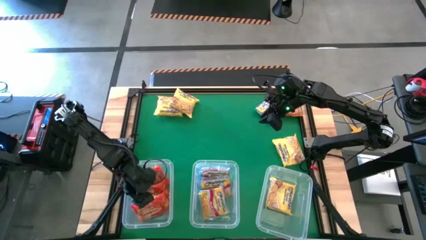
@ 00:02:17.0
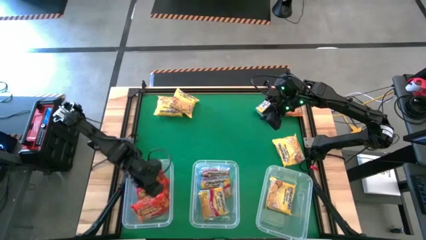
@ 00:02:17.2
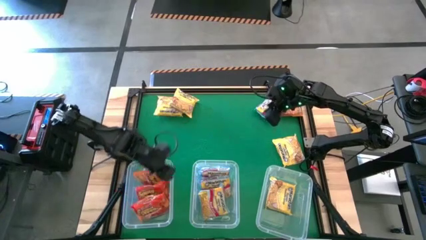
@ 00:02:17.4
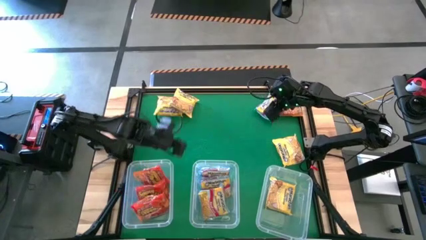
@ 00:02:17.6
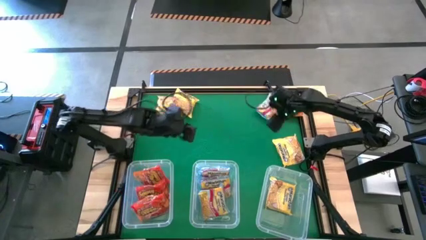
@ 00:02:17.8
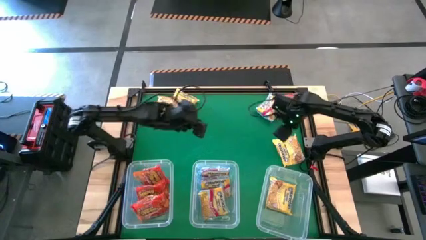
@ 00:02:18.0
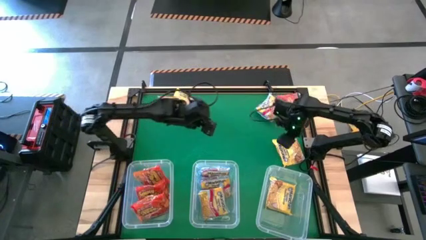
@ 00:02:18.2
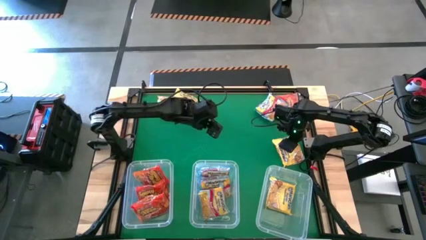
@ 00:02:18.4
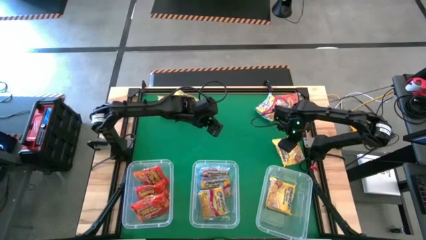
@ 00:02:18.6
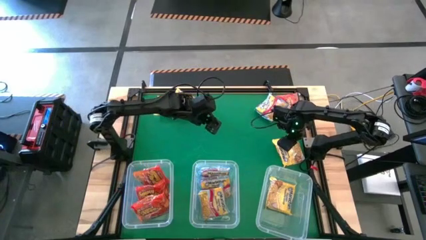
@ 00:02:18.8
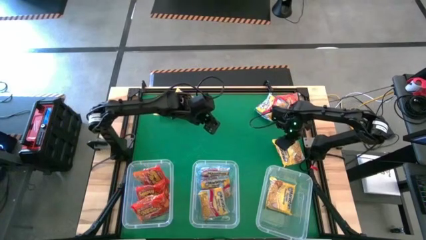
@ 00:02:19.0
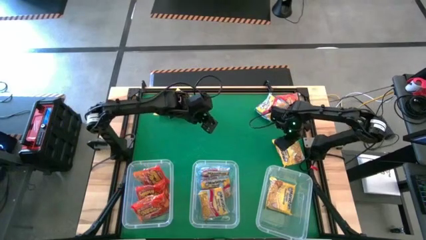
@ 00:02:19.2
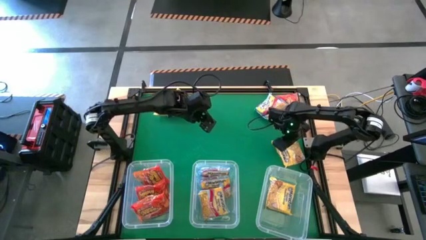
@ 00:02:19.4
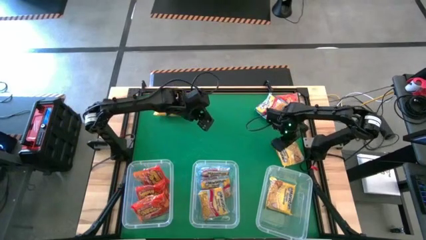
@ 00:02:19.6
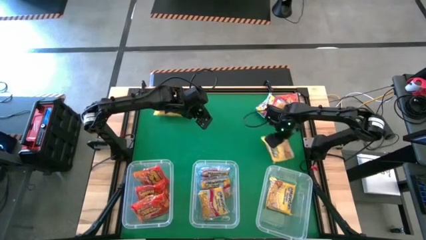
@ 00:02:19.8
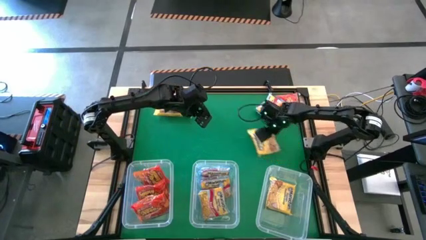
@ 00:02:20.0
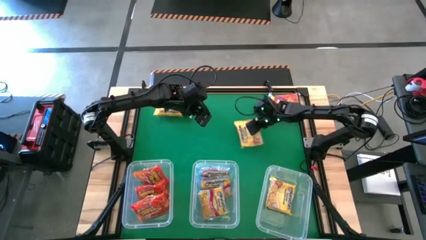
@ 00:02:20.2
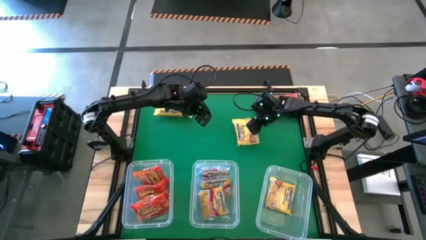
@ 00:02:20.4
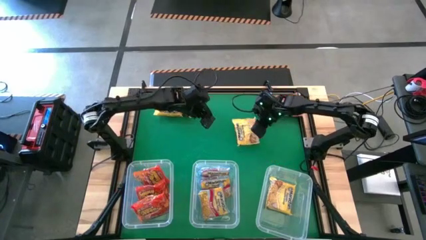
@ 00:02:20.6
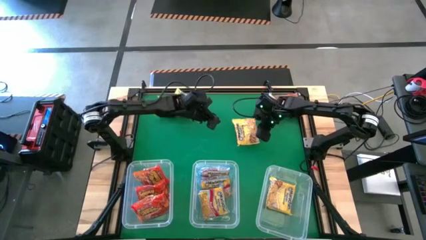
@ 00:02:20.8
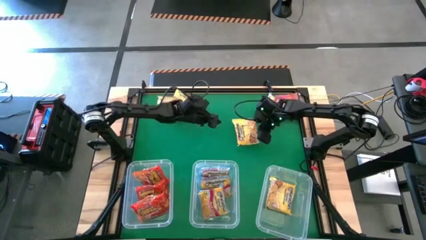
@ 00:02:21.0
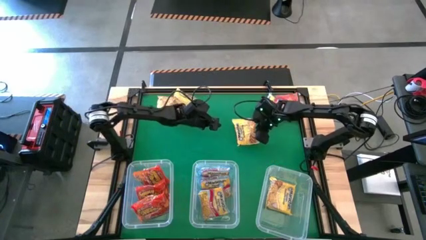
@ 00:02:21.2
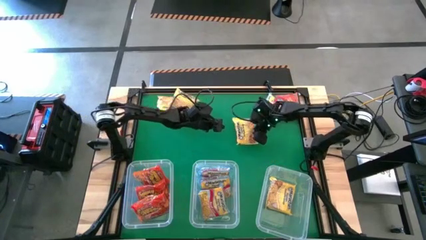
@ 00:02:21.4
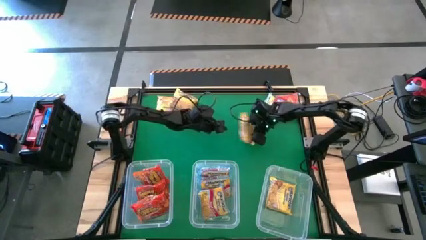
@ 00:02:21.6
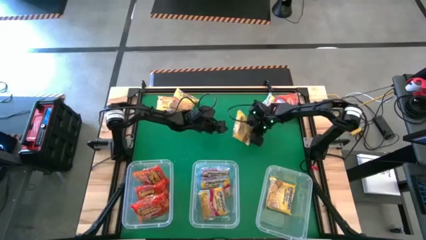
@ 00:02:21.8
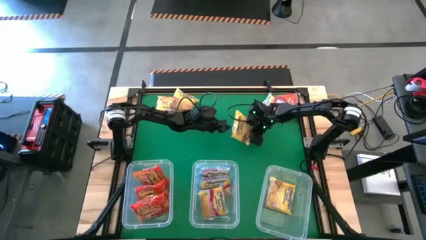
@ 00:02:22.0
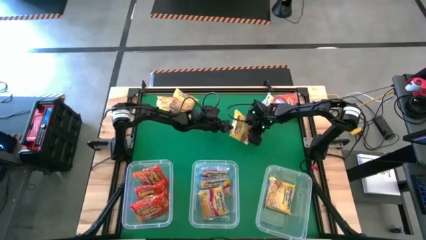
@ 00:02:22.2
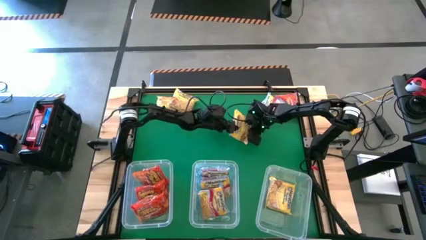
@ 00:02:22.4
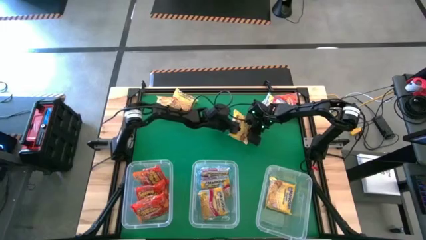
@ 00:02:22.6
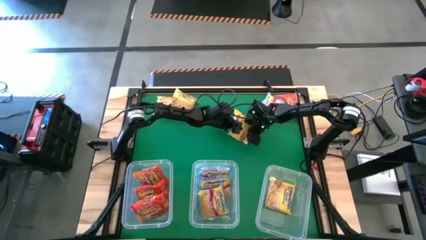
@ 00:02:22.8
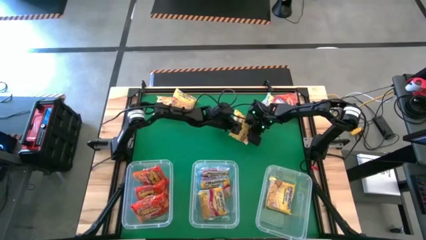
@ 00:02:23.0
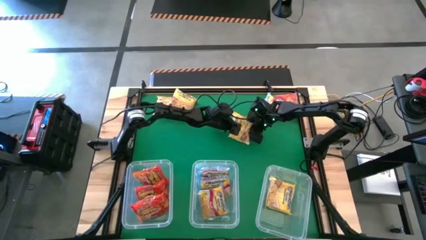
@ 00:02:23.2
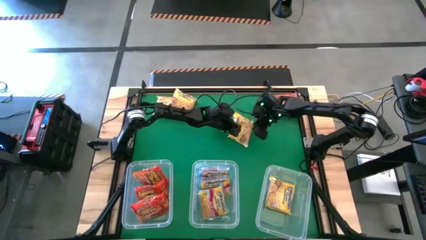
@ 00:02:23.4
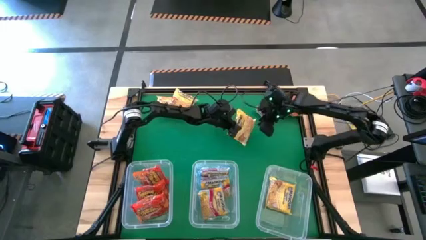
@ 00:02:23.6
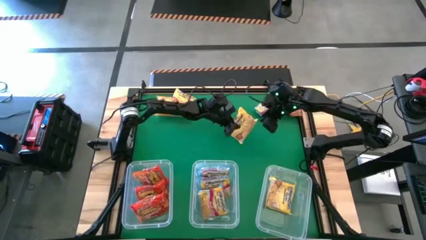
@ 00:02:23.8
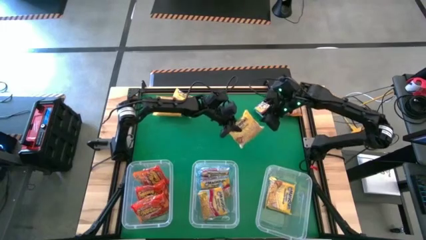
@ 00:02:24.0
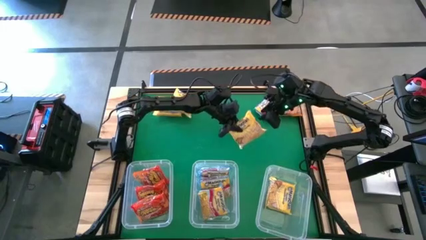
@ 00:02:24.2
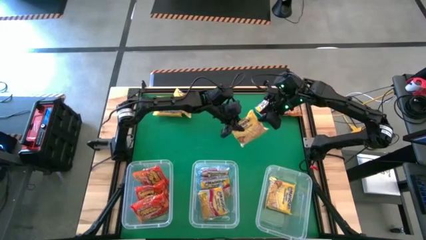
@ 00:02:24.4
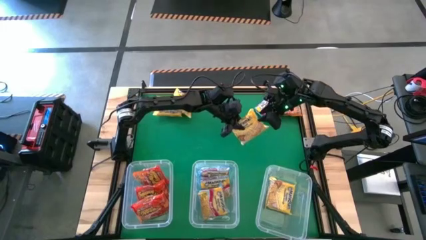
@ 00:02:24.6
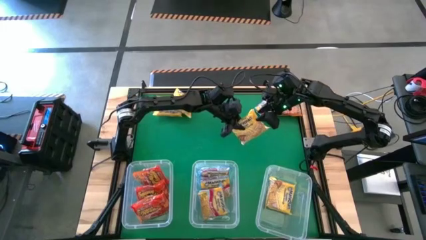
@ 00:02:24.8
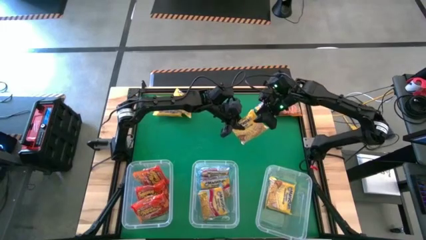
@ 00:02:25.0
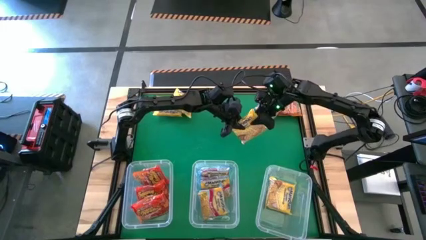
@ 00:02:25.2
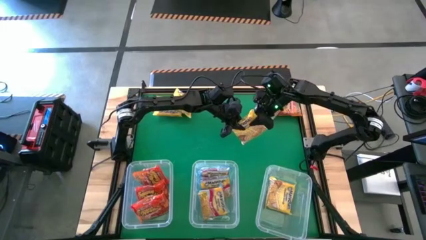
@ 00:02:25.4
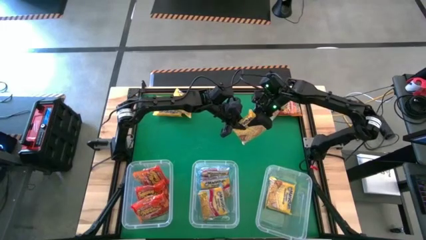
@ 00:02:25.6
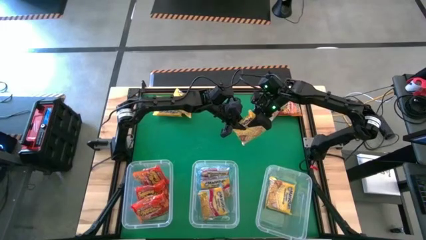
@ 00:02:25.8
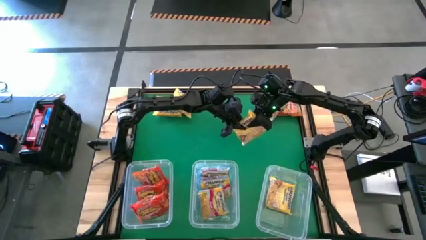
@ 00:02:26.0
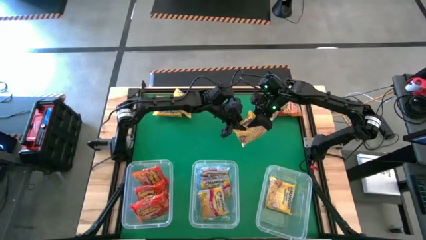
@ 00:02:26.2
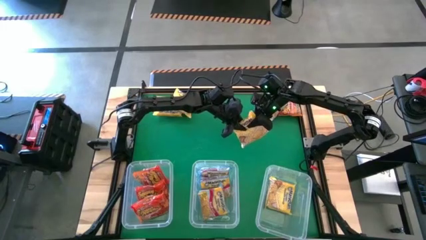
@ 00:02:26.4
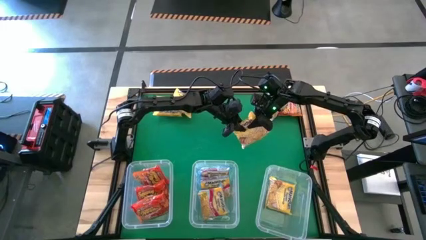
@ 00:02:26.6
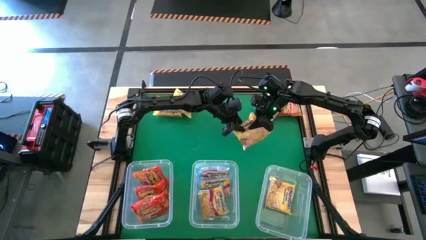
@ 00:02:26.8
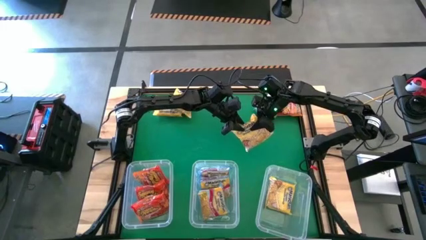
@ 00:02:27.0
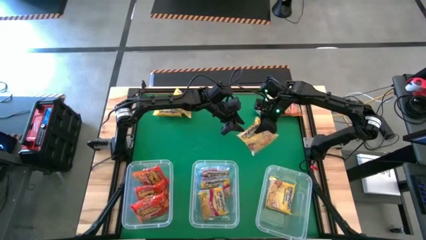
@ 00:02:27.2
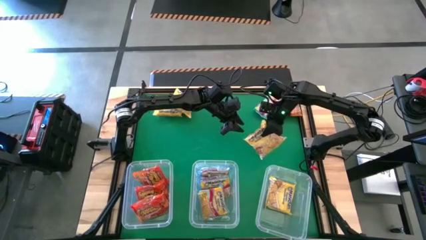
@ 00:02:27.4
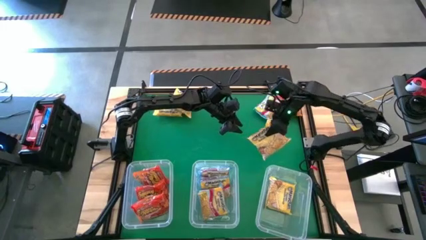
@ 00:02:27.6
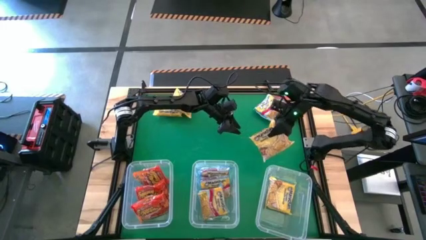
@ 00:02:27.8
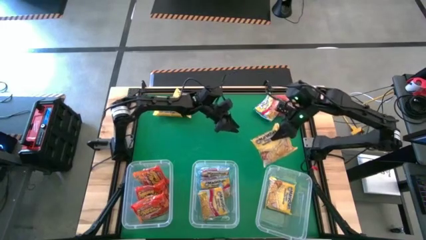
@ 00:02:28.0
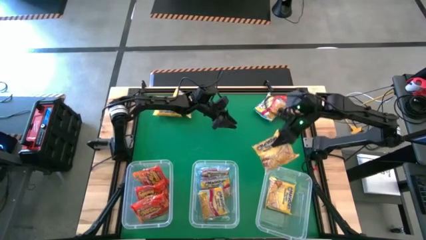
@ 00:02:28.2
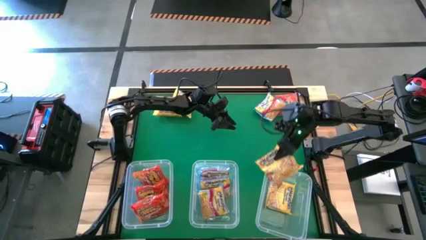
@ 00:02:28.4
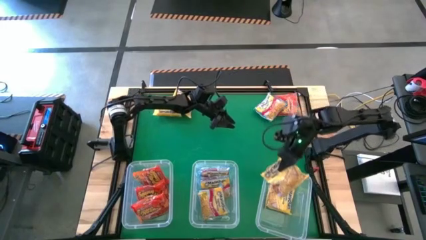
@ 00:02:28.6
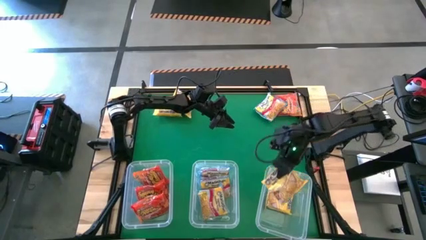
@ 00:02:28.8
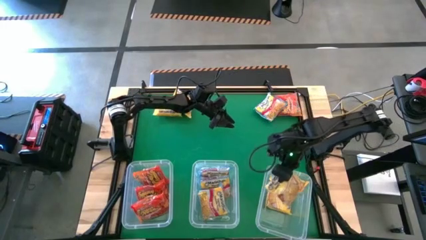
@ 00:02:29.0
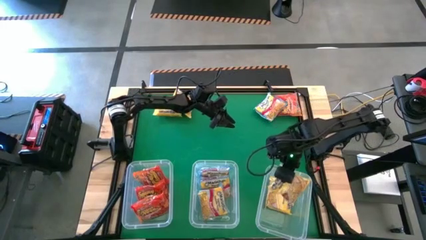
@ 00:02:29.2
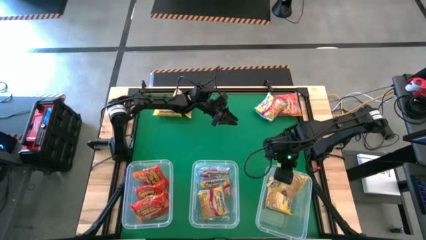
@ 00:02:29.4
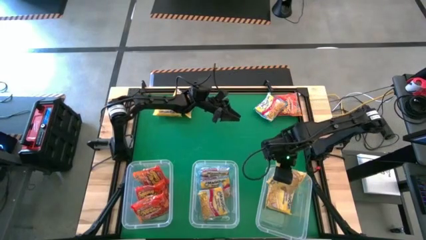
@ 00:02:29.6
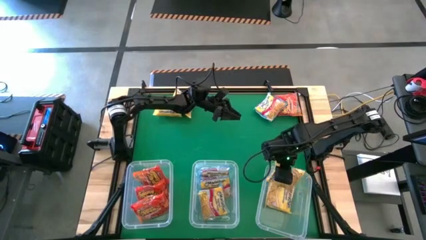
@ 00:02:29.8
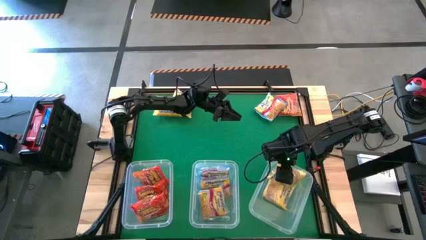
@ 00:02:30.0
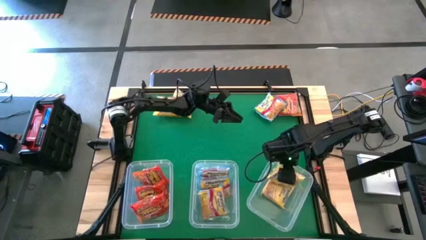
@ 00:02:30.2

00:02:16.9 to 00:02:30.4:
Task: Sort Maruchan noodles
Put the yellow noodle pack into the right transparent bin
